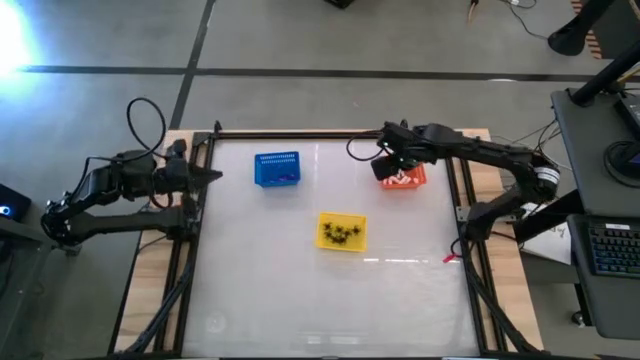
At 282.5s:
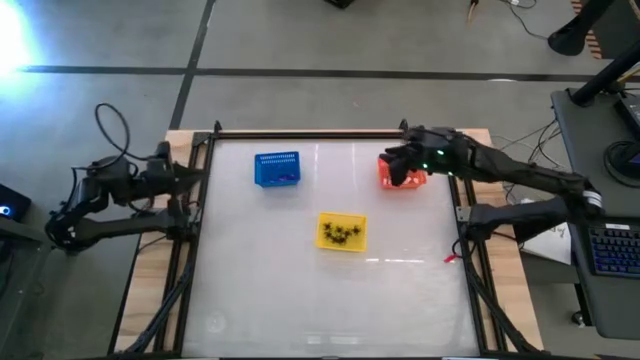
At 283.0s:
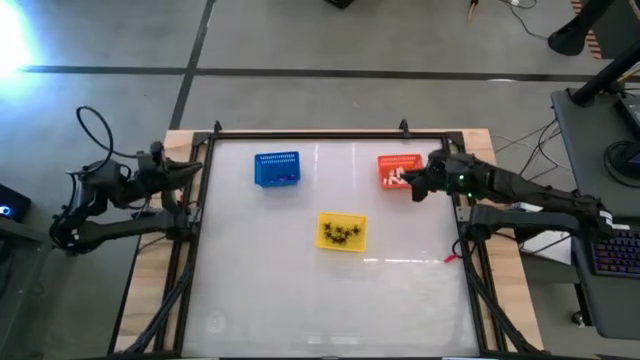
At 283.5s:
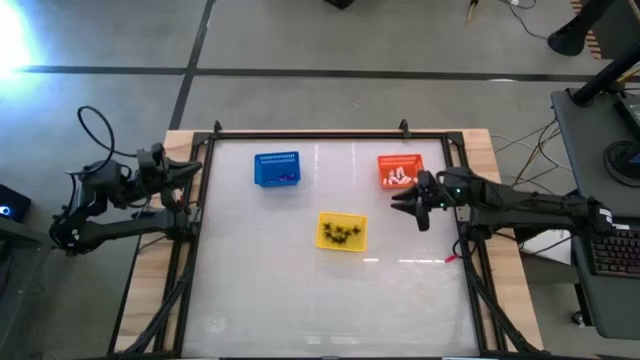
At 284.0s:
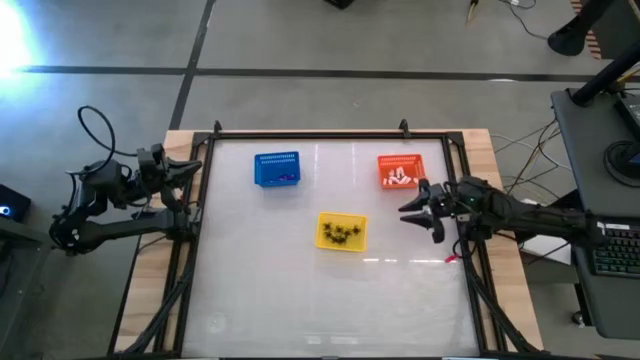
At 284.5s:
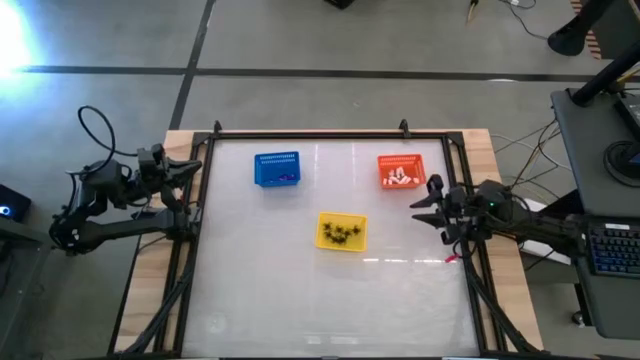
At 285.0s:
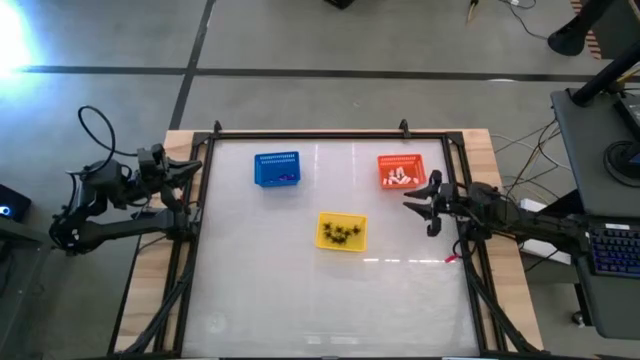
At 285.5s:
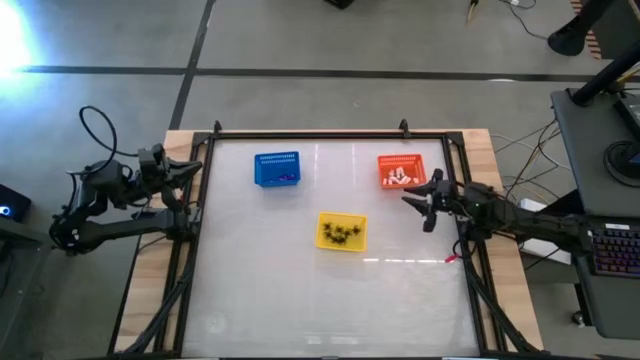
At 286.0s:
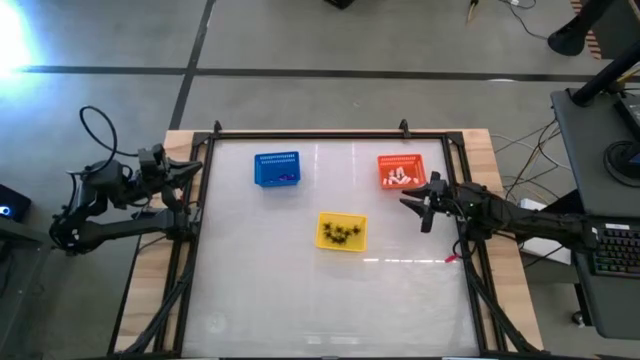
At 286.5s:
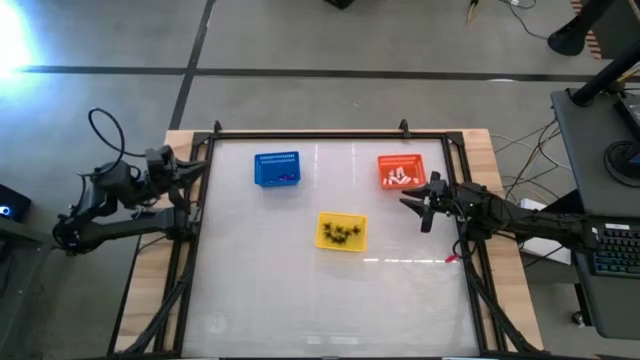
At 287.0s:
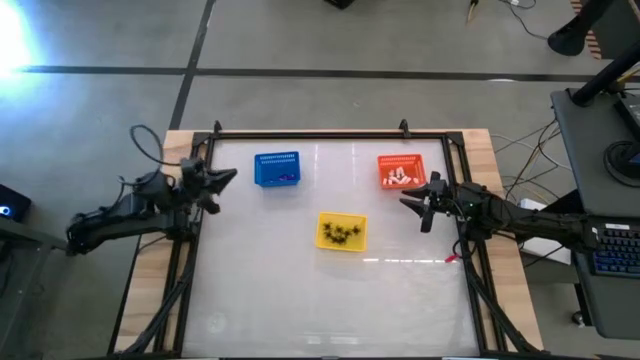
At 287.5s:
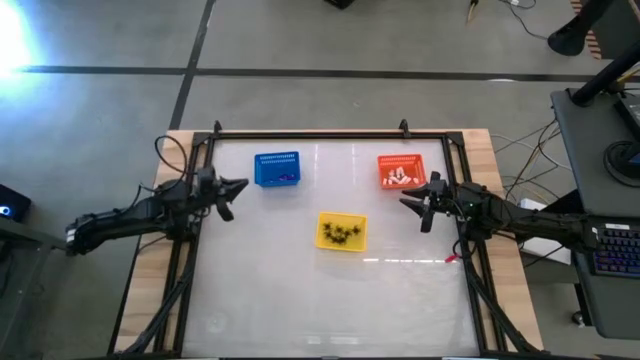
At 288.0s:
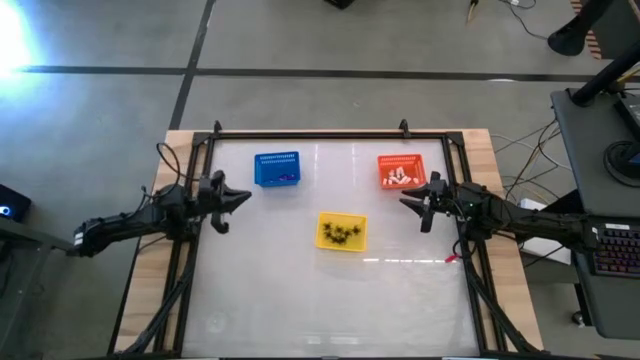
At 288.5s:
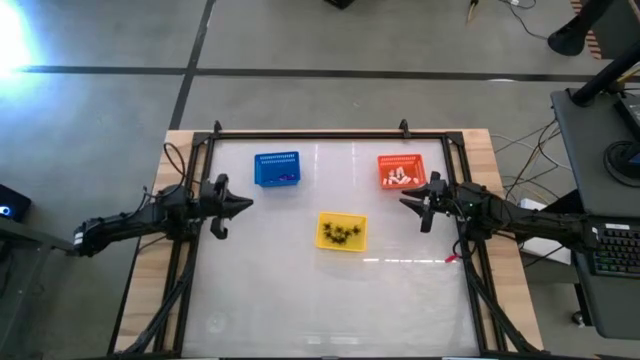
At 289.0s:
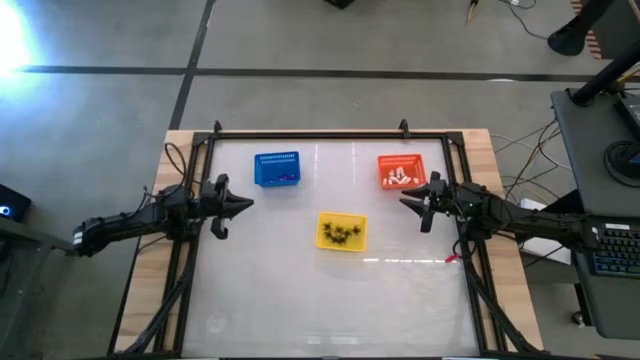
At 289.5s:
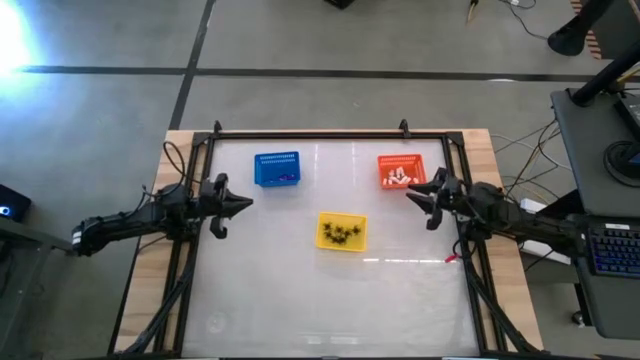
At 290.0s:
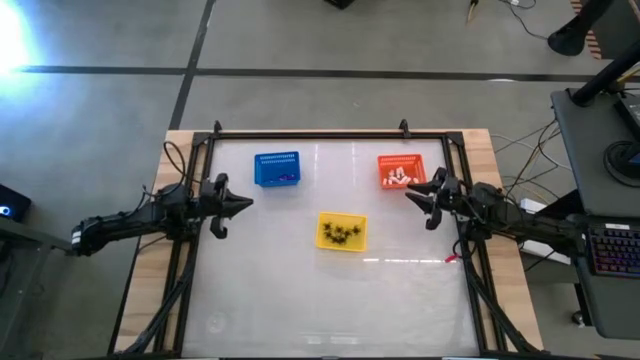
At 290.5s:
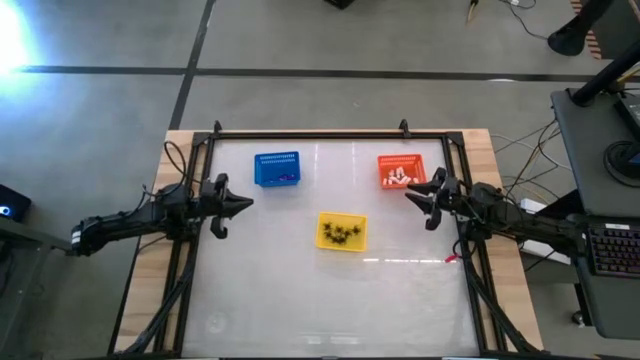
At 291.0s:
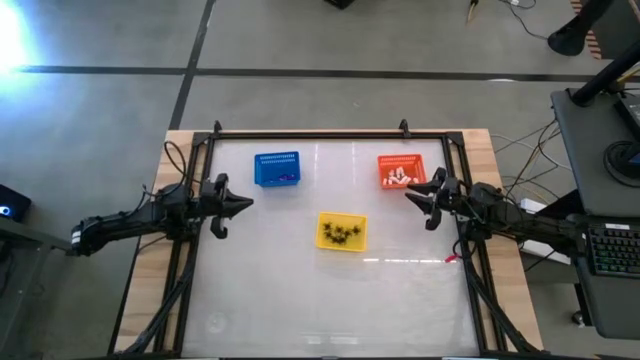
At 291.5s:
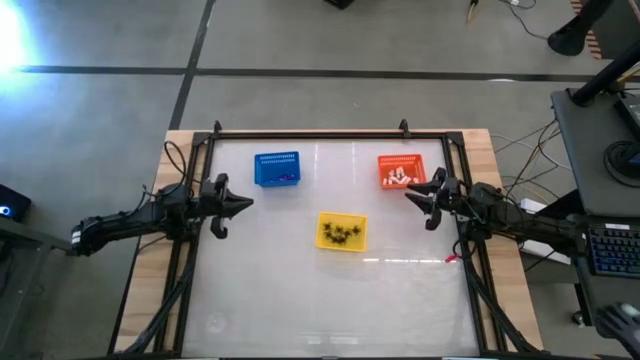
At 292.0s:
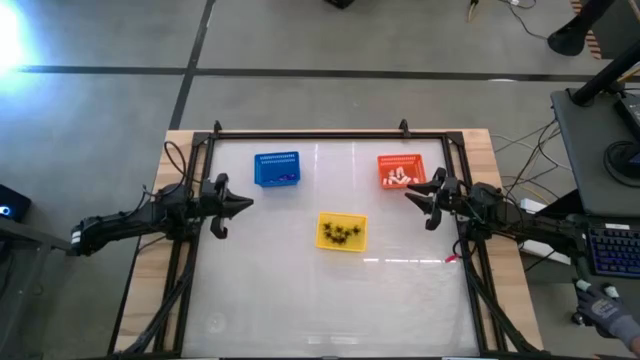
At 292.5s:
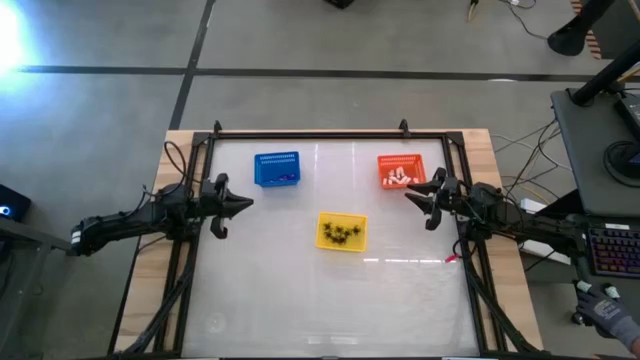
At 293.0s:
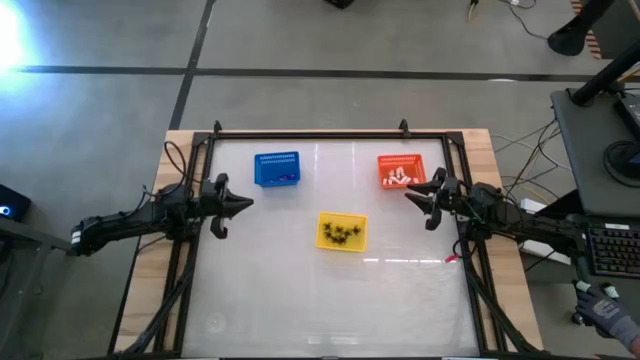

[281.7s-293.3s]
Task: Sort Halloween decoration
Return to Home Position

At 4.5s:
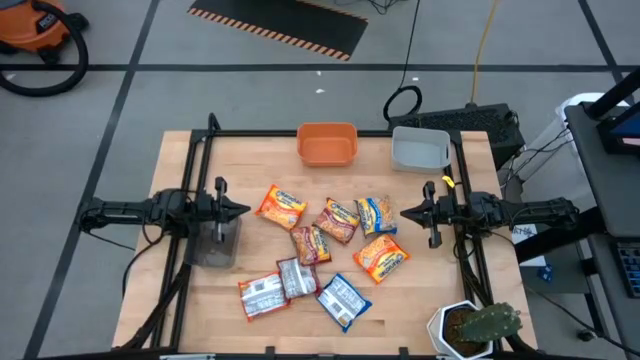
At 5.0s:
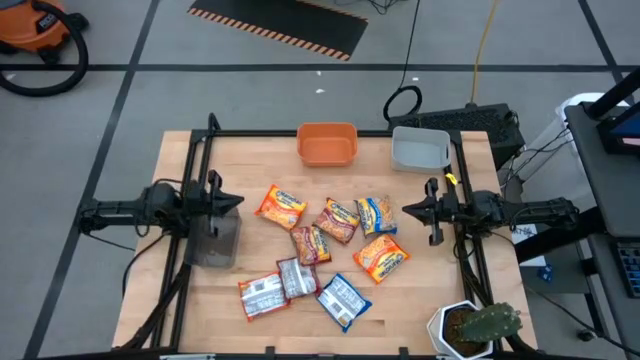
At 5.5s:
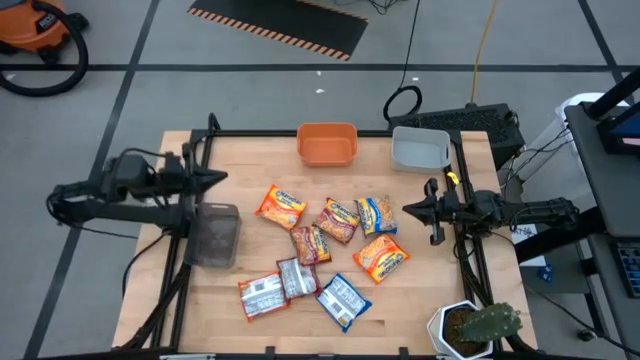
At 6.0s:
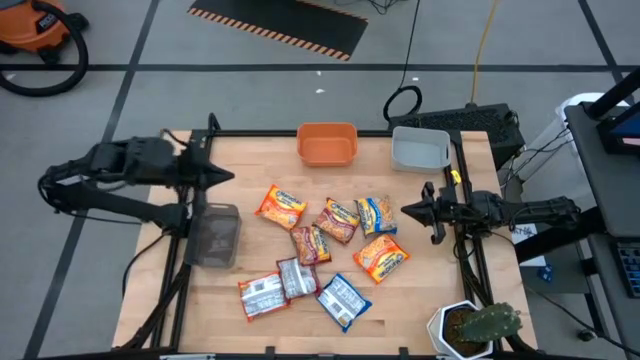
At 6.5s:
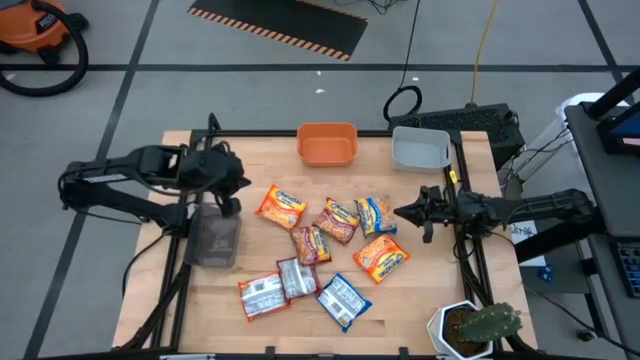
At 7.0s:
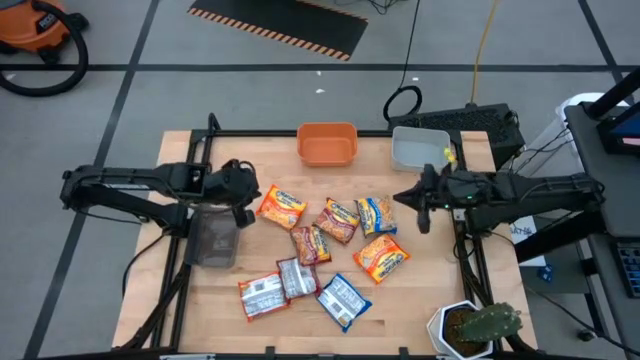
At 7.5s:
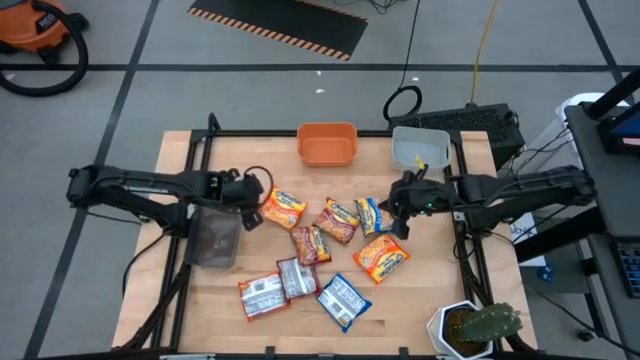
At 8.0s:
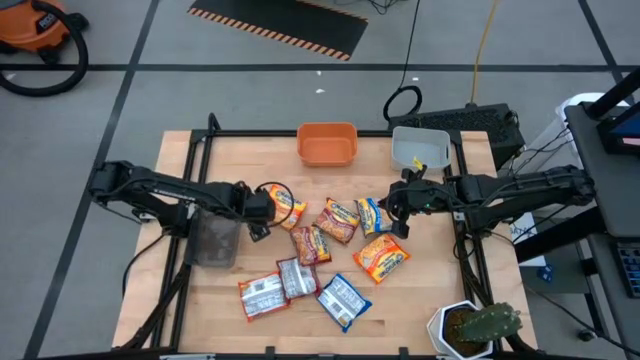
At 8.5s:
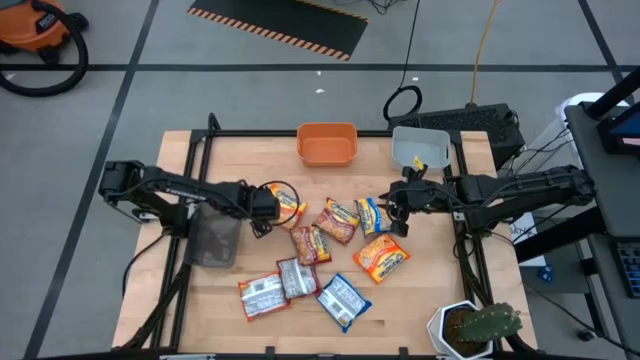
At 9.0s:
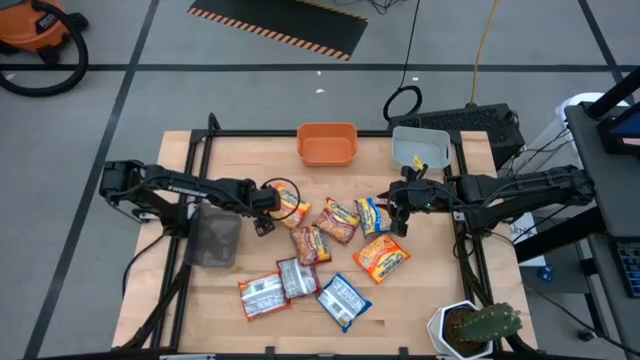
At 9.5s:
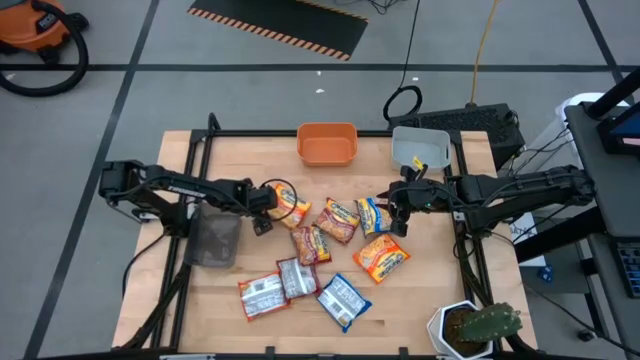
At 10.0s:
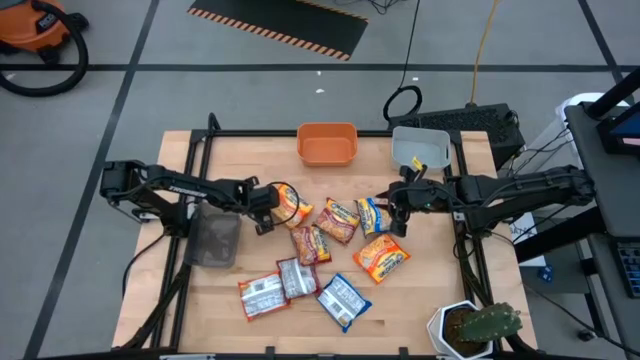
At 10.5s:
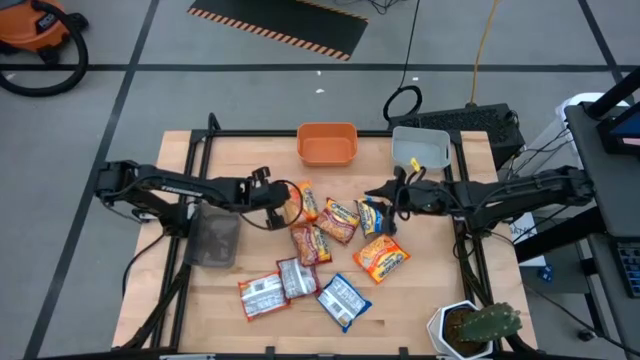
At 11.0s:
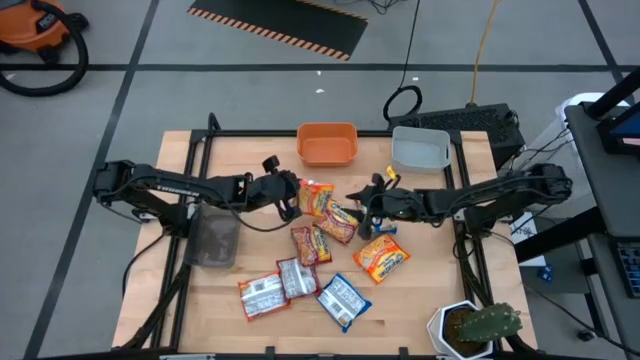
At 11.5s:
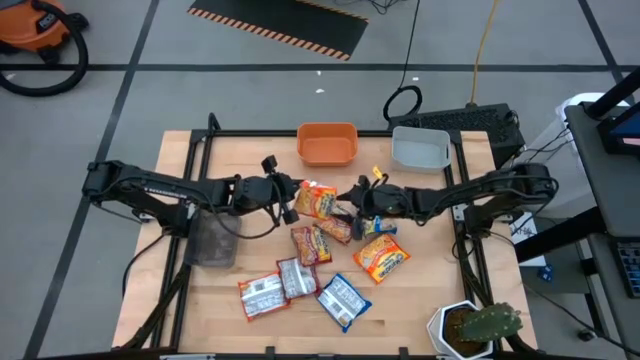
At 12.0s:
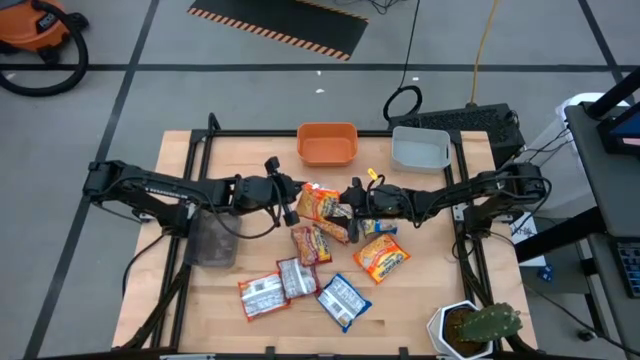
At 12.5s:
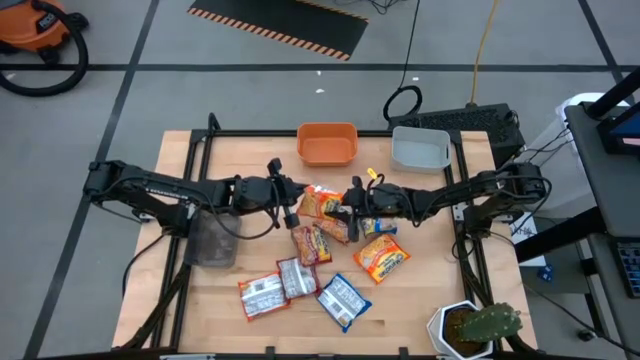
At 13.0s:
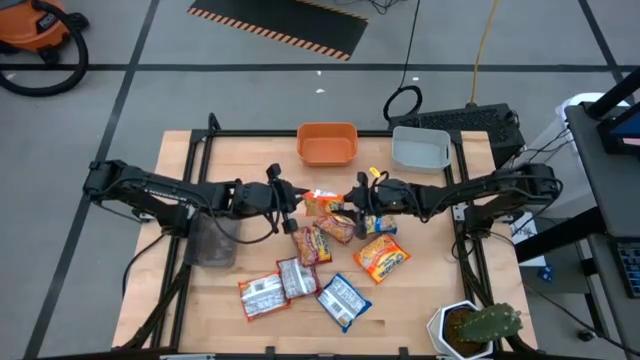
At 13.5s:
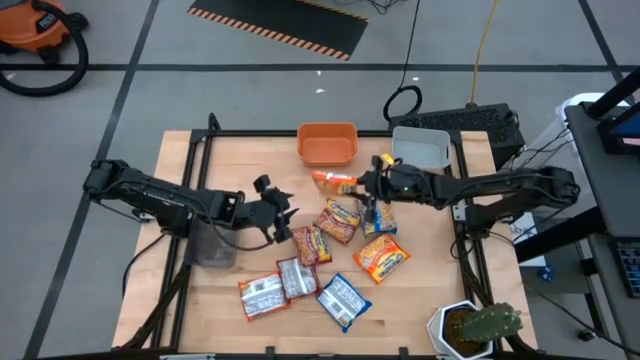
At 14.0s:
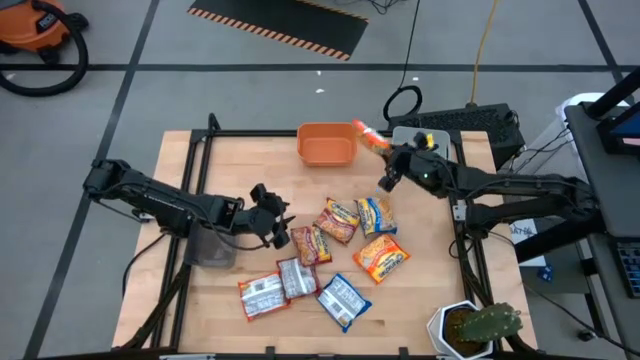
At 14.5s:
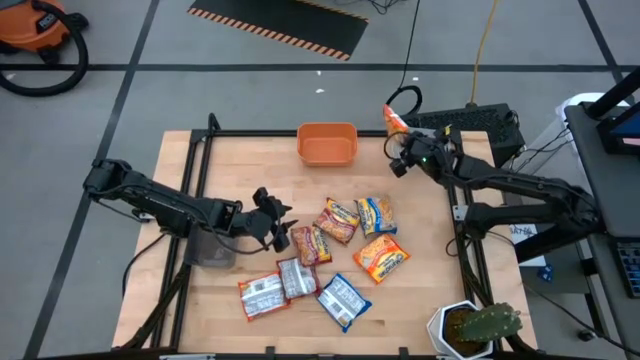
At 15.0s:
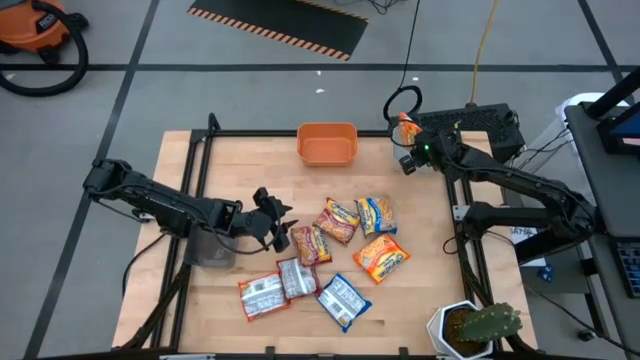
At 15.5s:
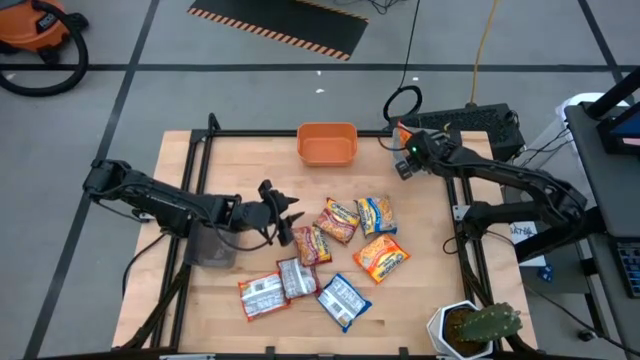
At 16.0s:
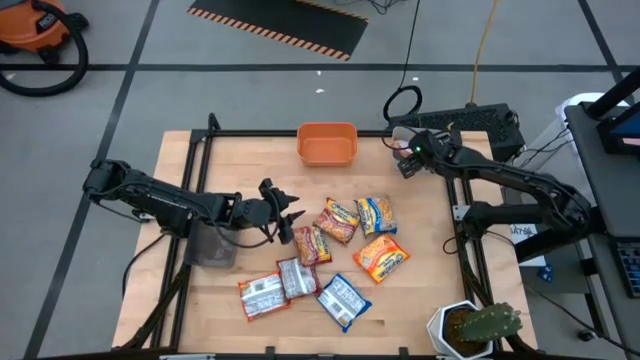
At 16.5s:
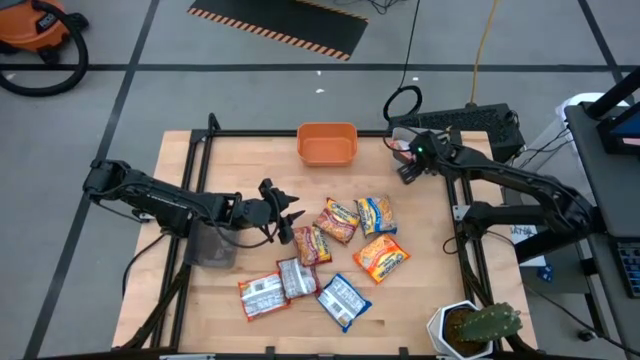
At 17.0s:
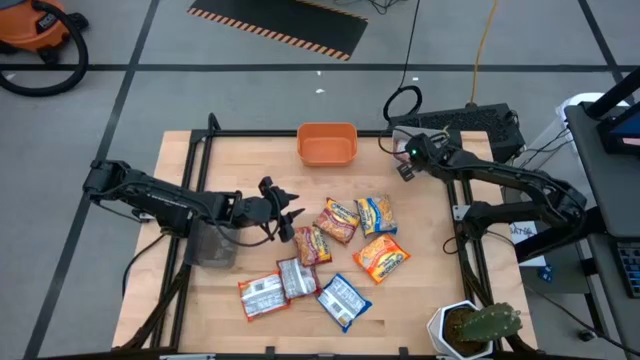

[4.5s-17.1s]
Task: Sort Maruchan noodles
Put the top orange noodle pack into the gray bin
